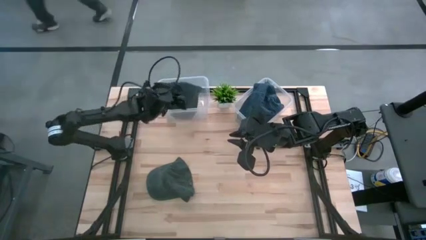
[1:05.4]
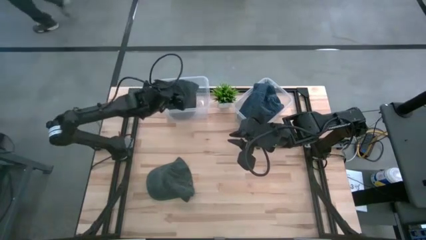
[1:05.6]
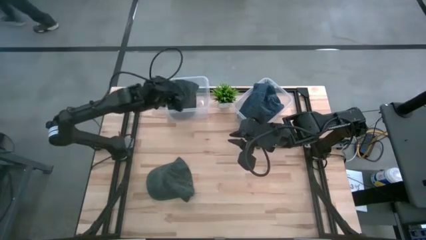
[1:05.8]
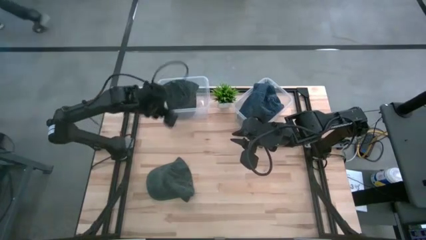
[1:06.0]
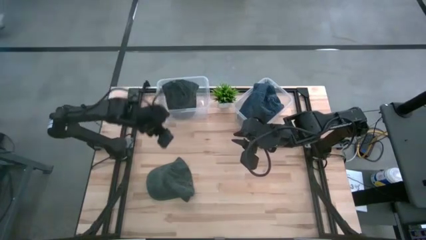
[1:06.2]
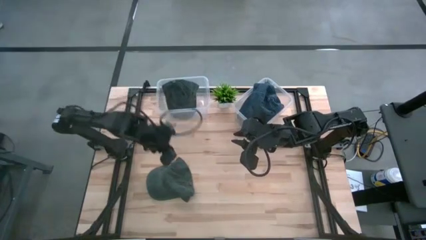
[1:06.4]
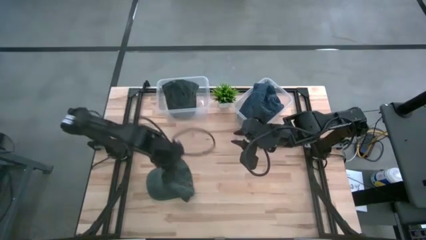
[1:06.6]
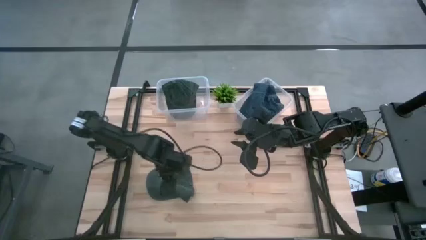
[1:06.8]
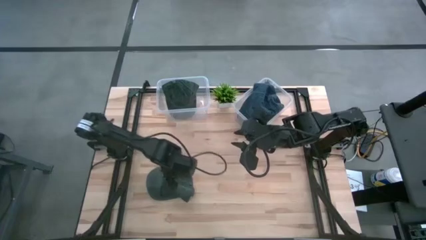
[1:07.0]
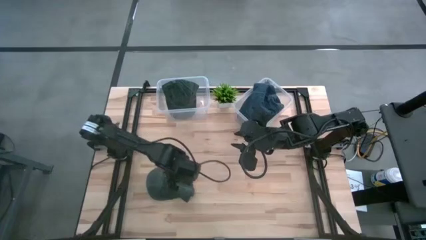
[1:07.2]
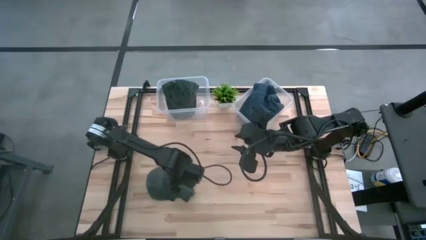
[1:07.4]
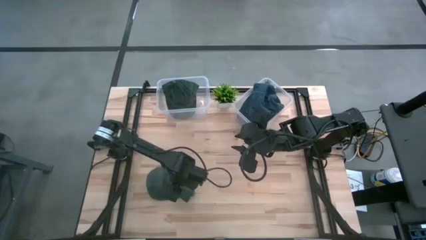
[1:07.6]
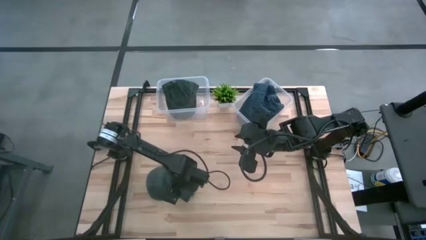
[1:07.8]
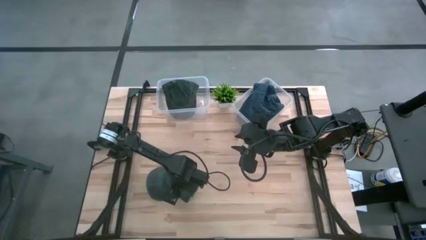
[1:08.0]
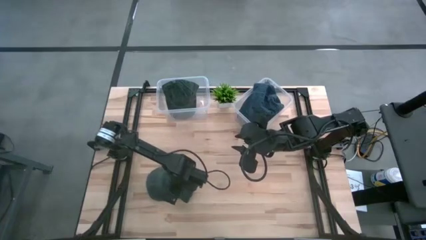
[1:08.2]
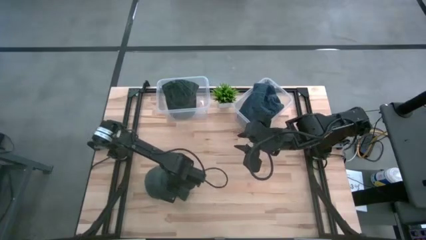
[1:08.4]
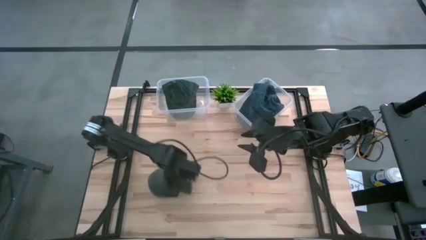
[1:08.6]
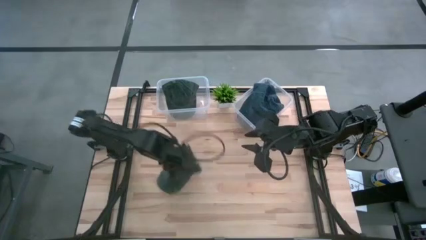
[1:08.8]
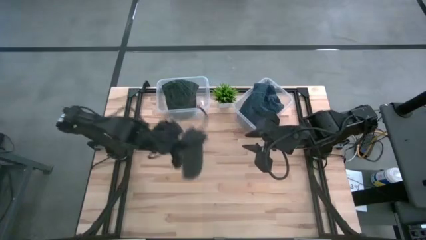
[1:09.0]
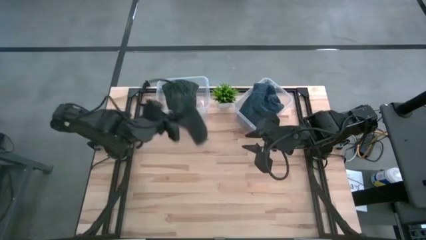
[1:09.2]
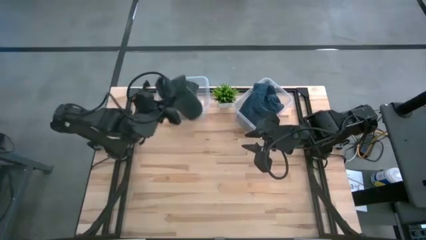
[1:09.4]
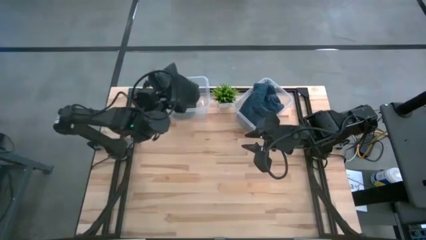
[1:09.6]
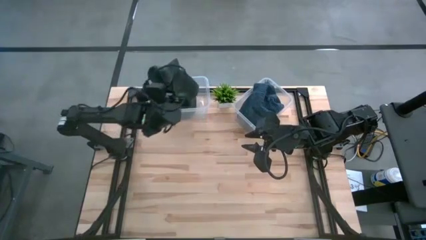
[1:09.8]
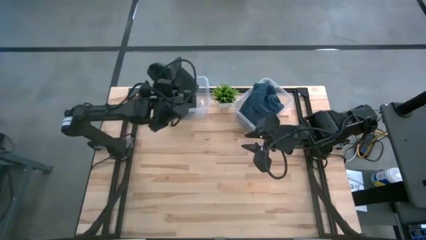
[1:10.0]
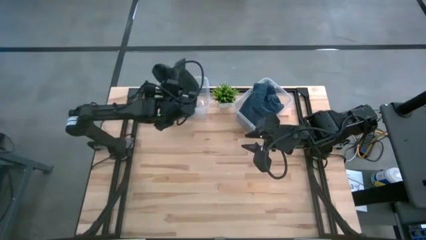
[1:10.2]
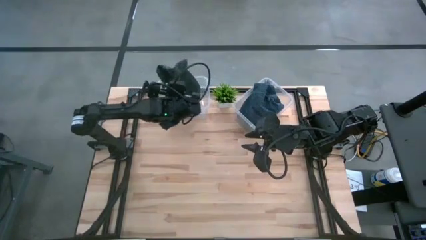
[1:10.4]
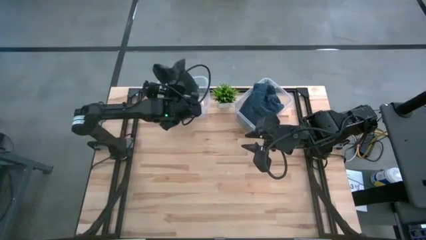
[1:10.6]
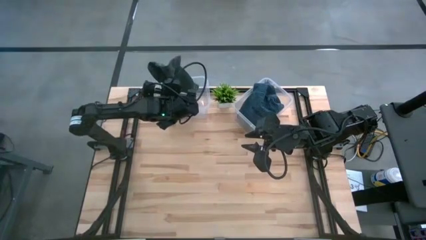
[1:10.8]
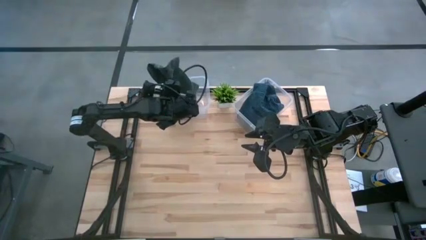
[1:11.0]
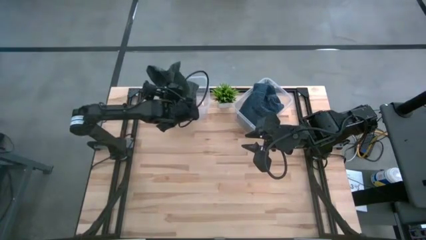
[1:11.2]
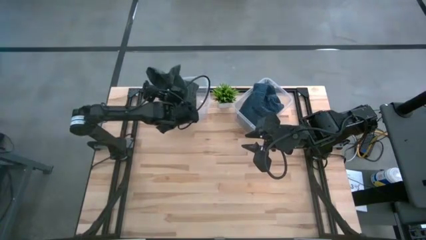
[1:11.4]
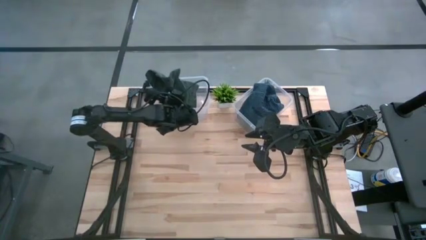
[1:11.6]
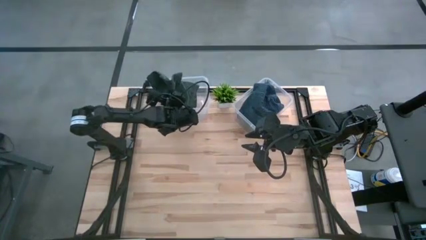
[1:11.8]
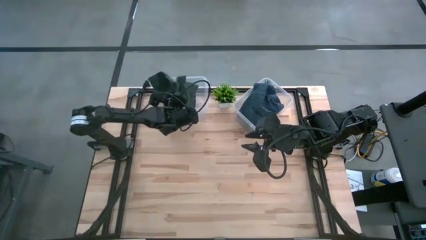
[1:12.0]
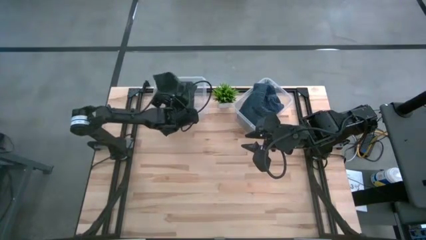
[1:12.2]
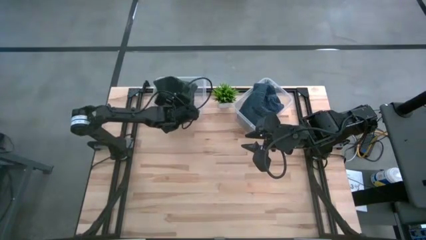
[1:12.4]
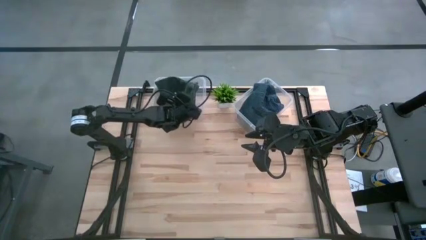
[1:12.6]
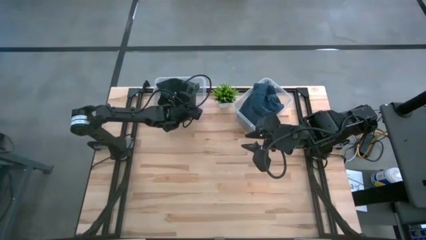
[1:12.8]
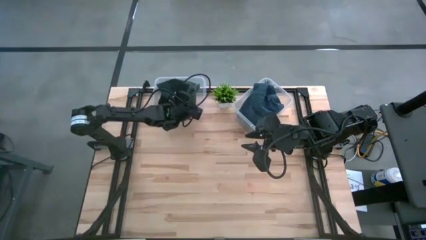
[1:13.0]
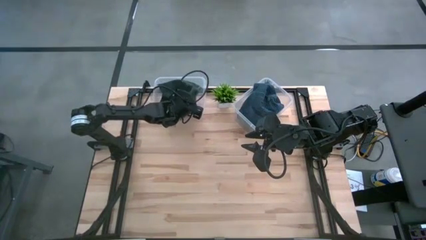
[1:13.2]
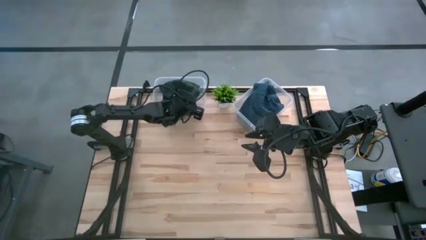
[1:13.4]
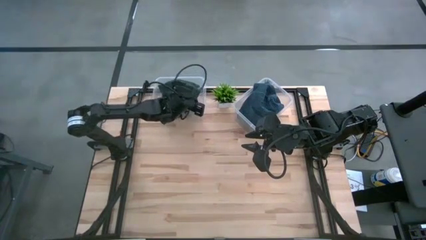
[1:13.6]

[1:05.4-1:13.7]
Task: Pick and place caps into container
Put the black cap into the left transparent container
